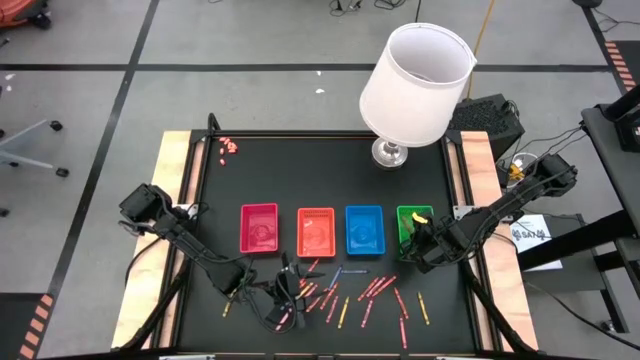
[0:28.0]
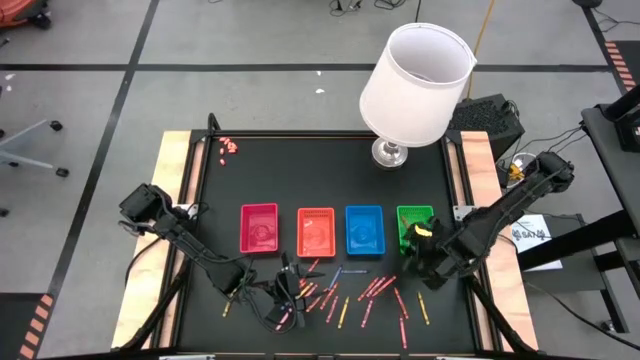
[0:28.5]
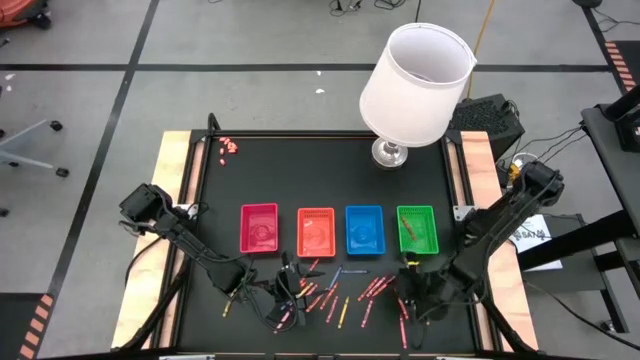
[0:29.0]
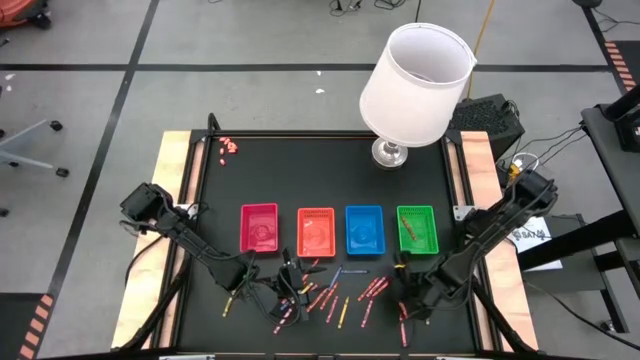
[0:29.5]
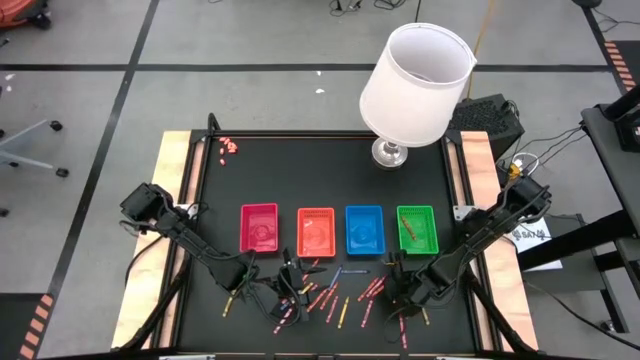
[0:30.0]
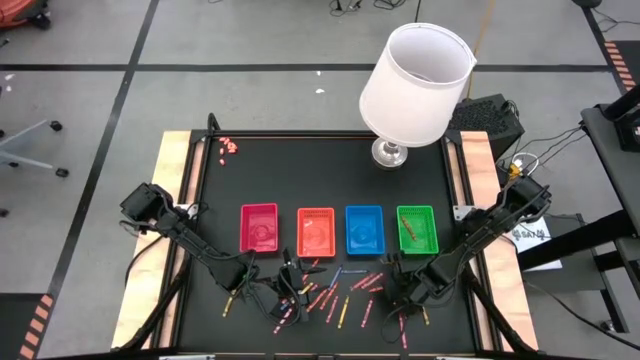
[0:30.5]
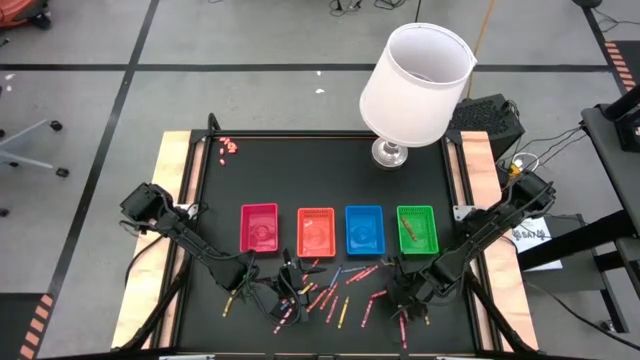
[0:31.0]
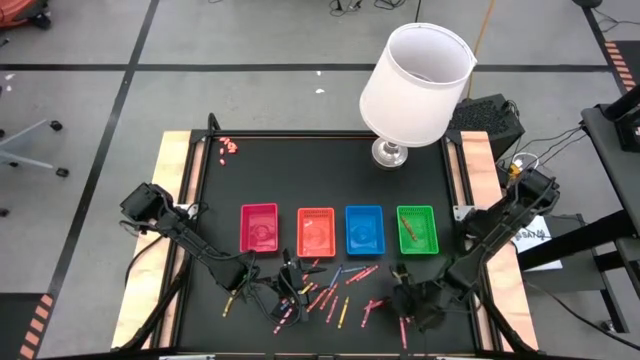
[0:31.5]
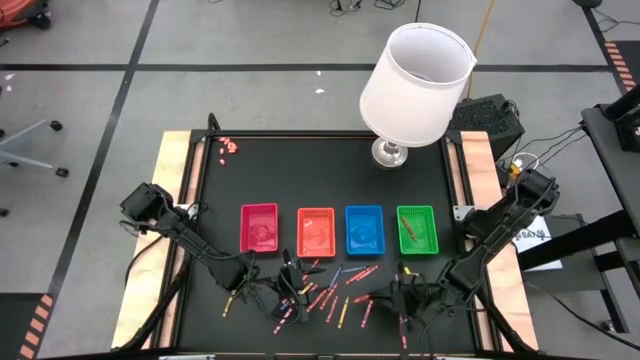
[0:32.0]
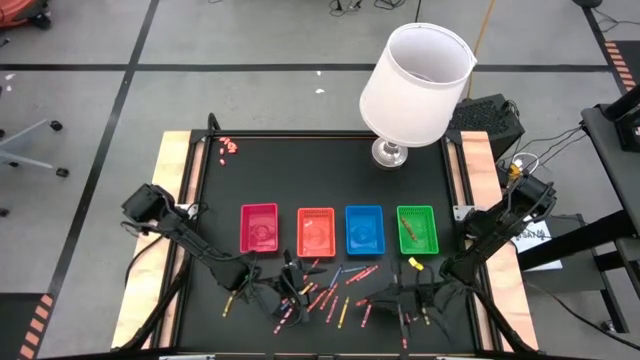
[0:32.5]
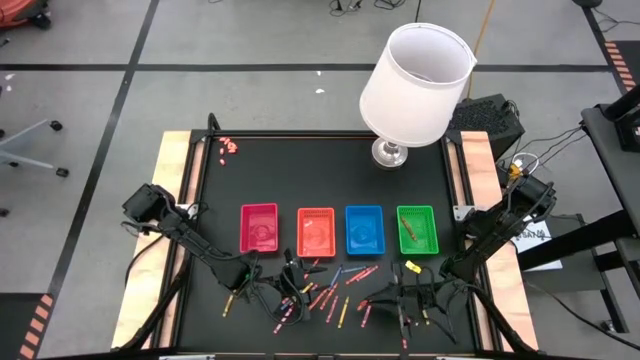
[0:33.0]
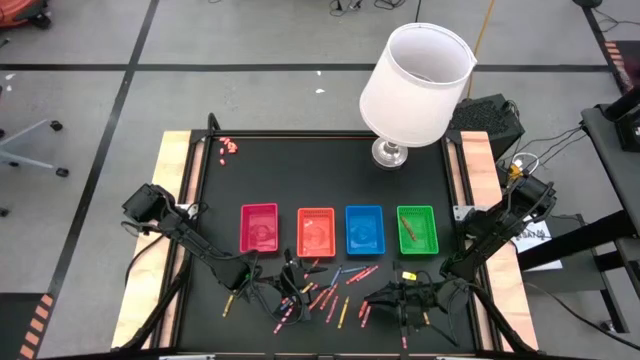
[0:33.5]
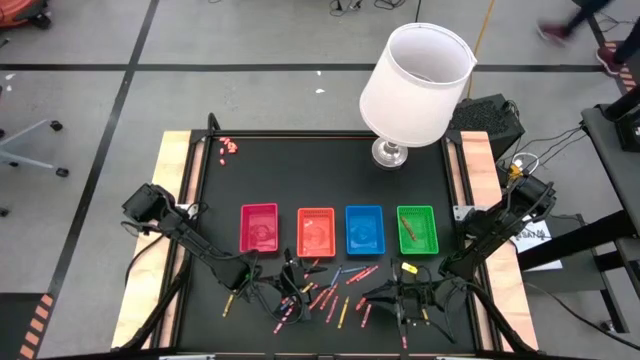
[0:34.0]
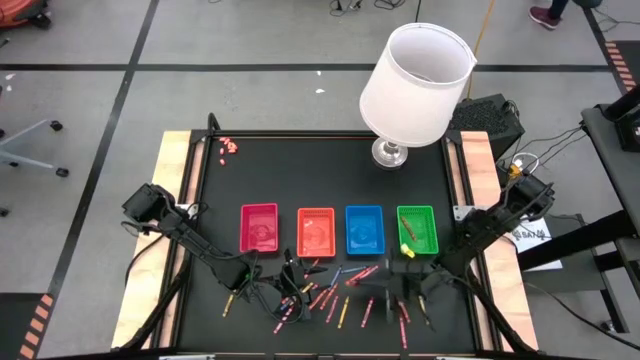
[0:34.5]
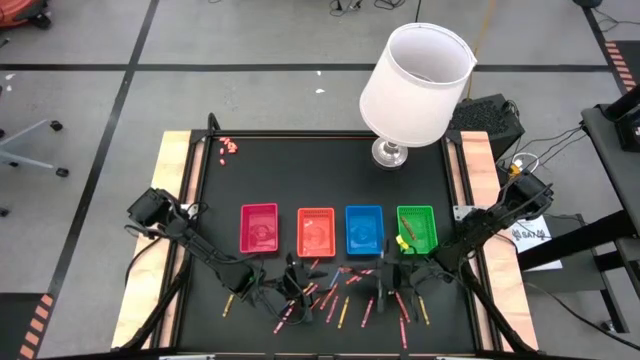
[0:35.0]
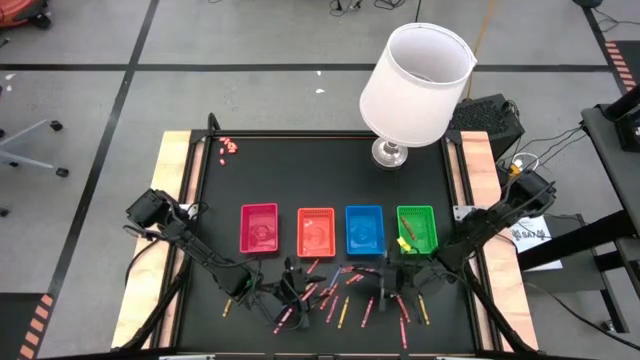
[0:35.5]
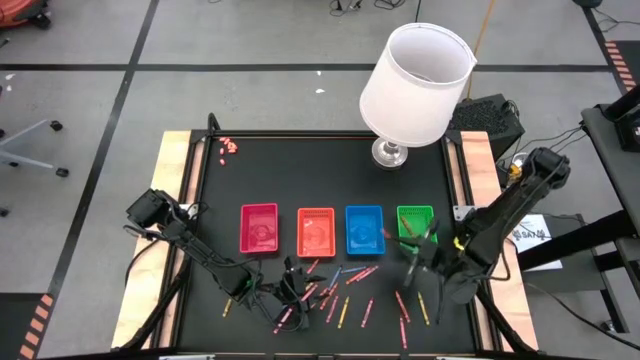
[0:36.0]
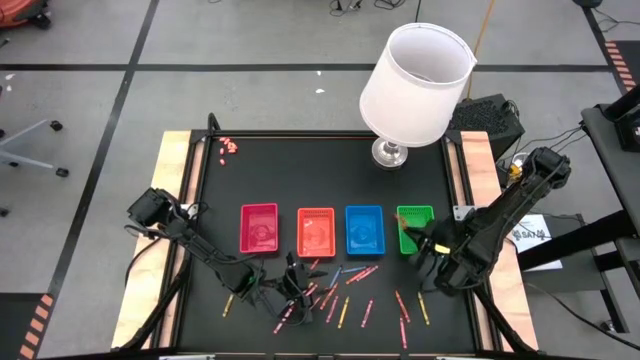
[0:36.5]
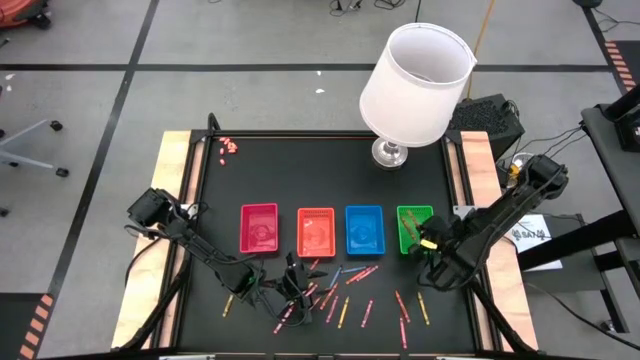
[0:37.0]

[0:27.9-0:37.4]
Task: Sort crayons
Put the orange crayon into the green bin

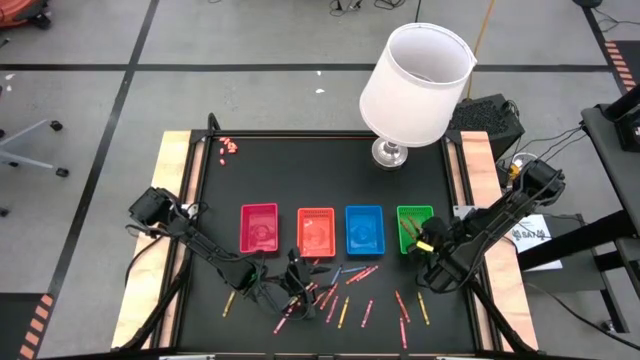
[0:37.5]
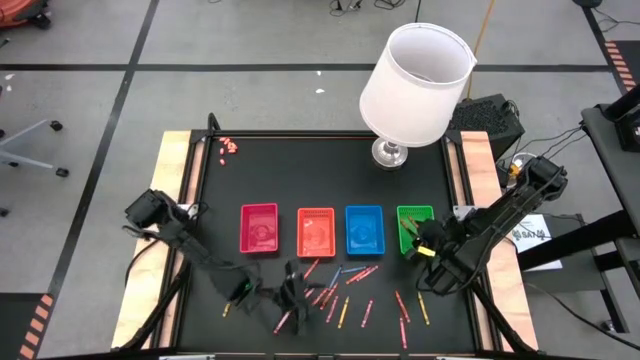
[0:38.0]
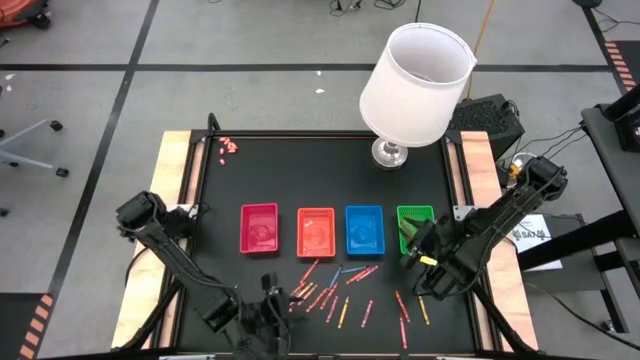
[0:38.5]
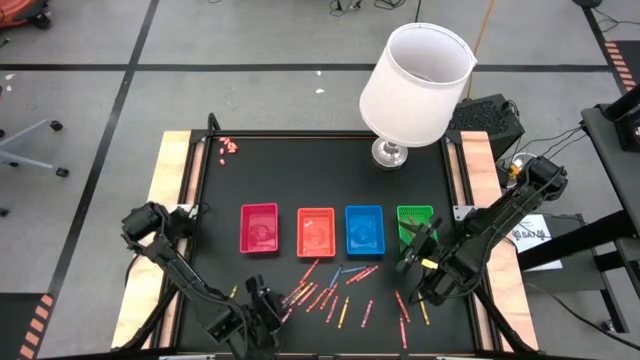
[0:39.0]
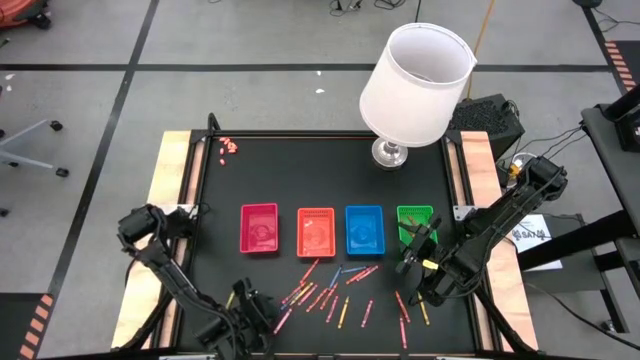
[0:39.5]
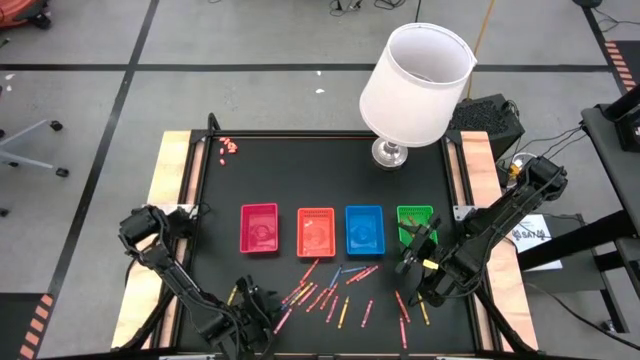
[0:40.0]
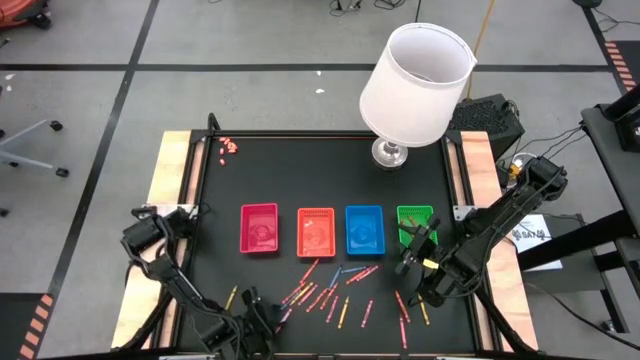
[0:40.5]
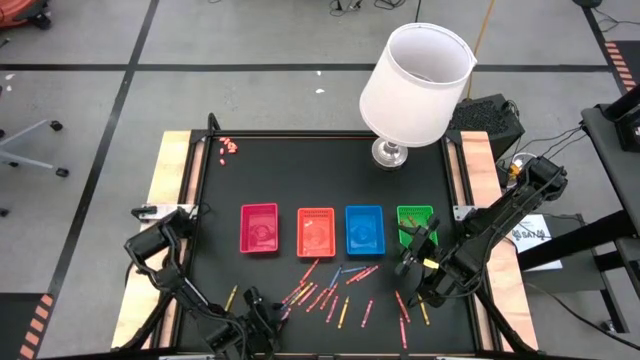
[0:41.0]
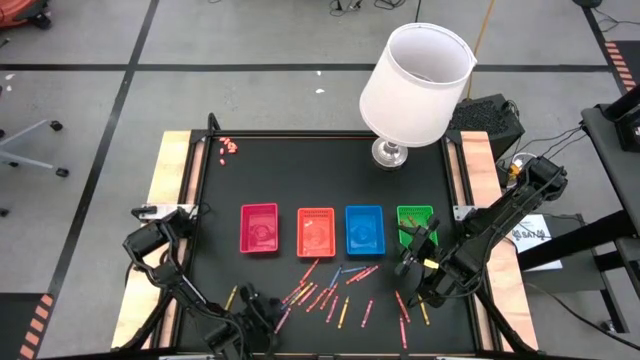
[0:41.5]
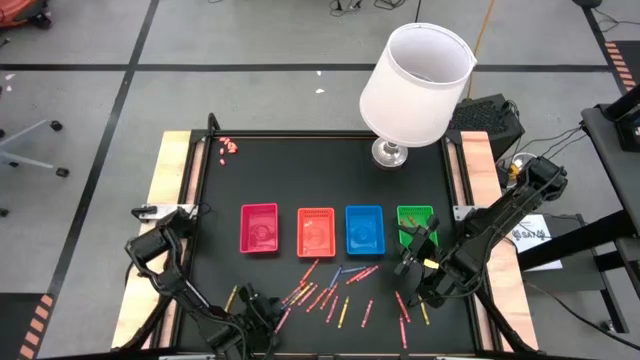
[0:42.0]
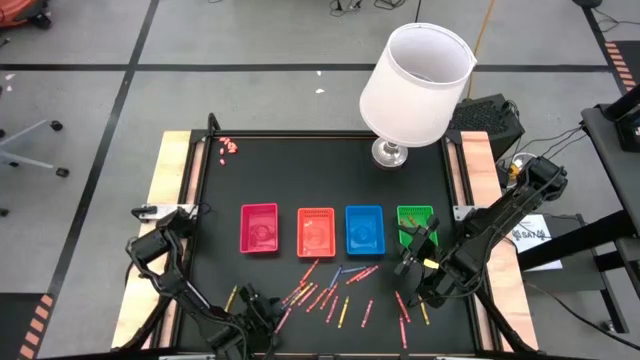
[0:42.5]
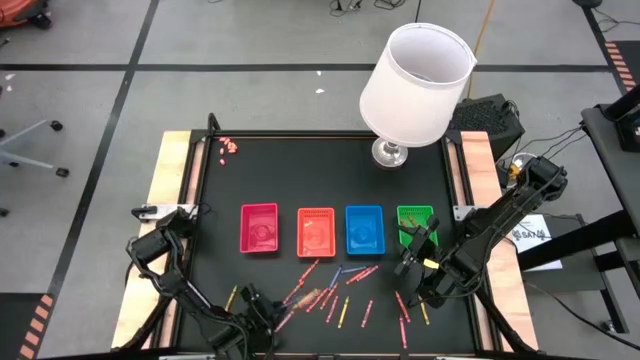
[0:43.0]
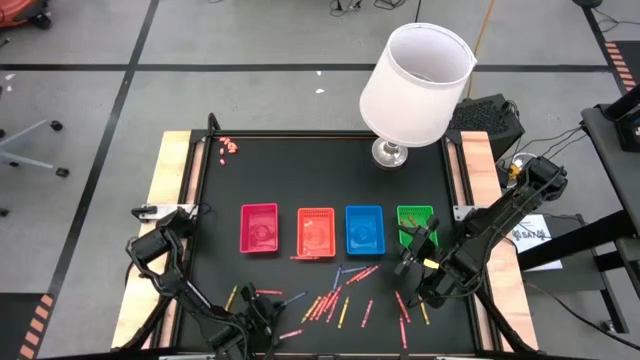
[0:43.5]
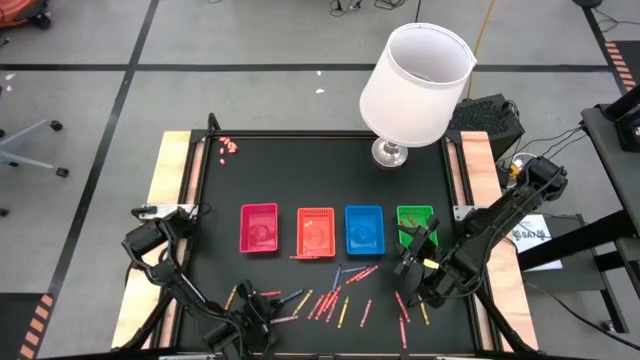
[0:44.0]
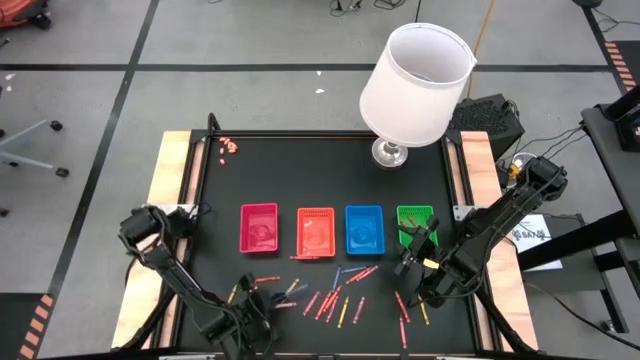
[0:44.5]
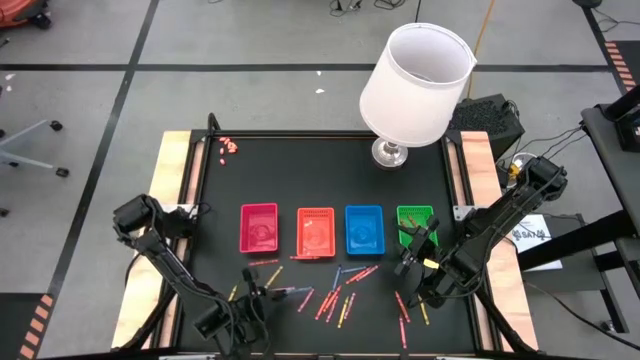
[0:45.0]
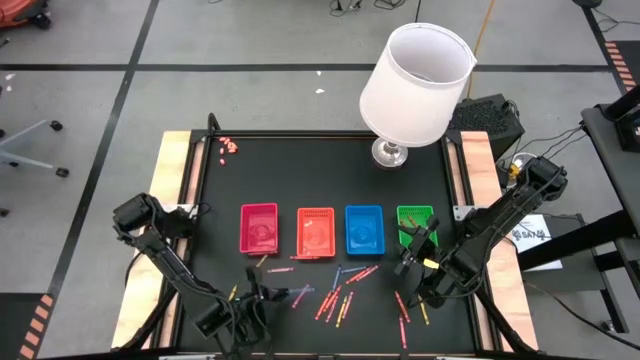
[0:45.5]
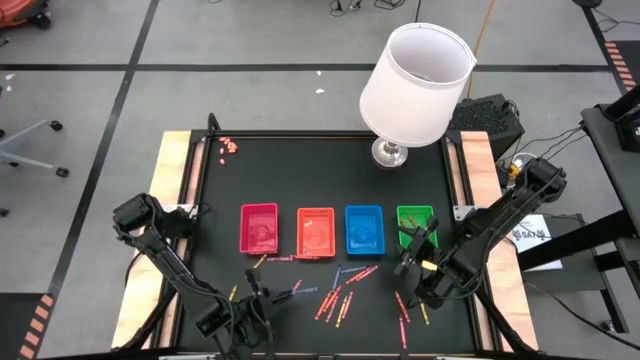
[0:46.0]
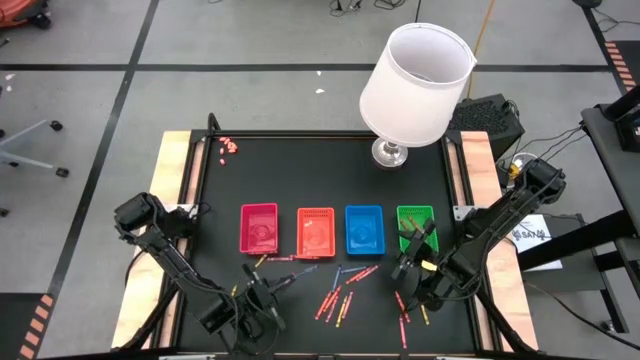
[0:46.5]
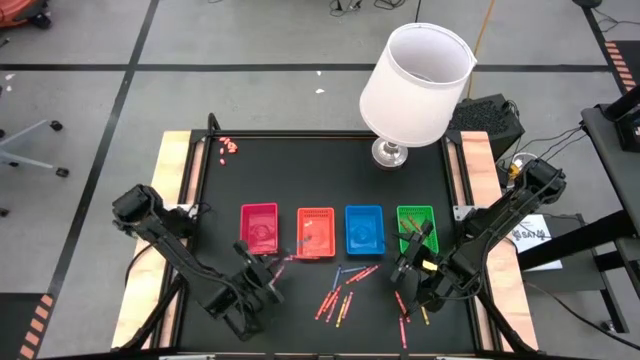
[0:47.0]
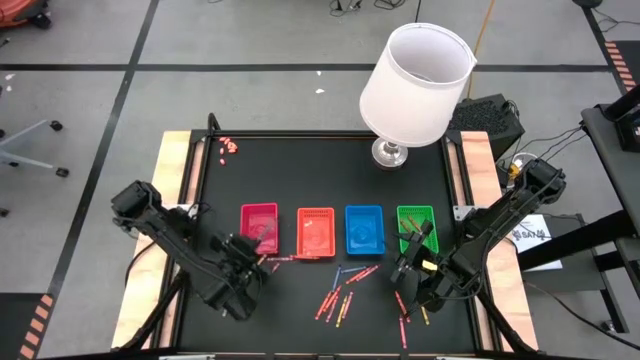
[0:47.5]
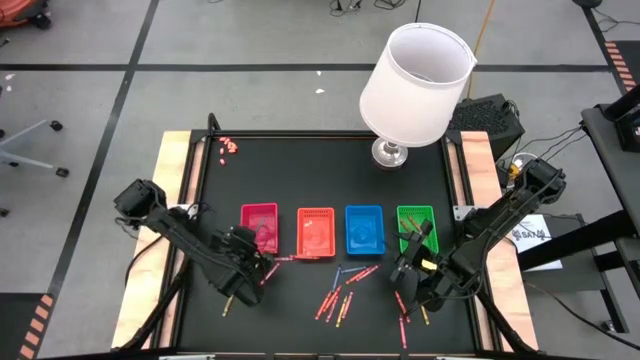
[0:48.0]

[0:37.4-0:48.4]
Put the blue crayon into the red bin

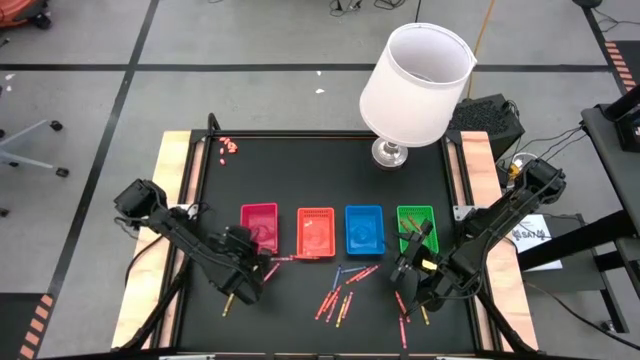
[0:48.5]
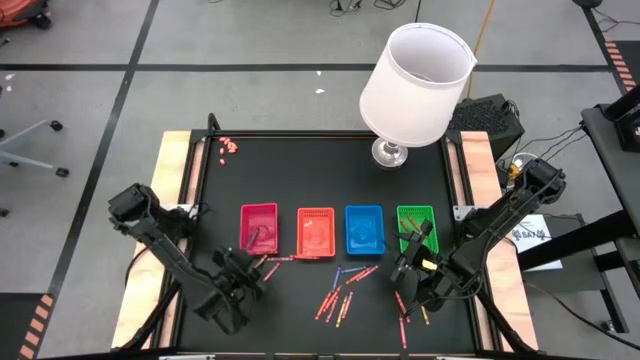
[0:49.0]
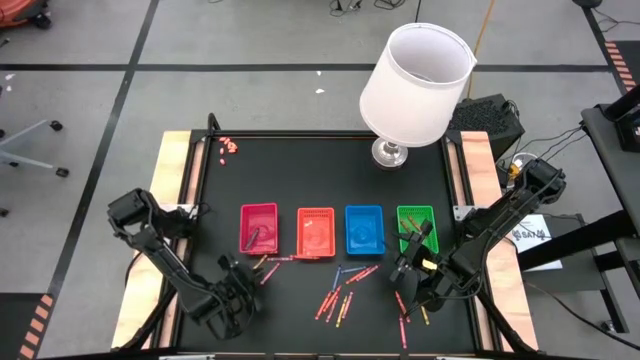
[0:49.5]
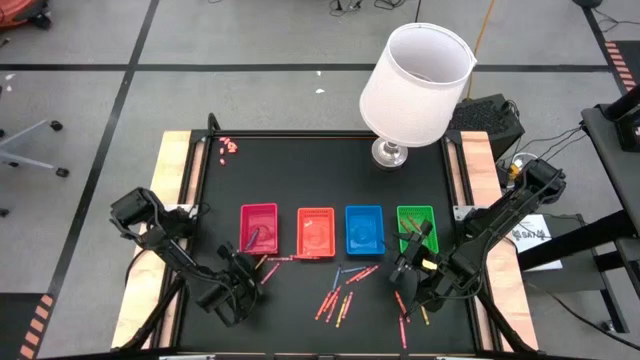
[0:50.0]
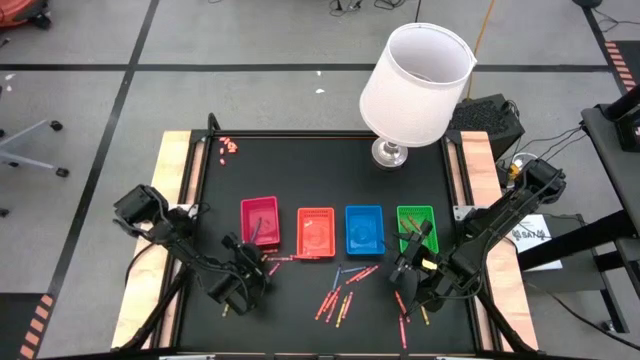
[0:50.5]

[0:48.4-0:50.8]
Adjust the red bin
